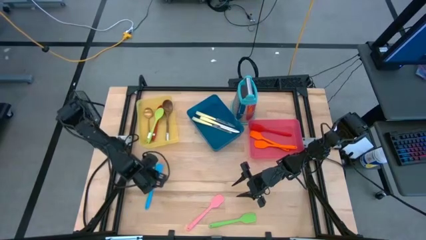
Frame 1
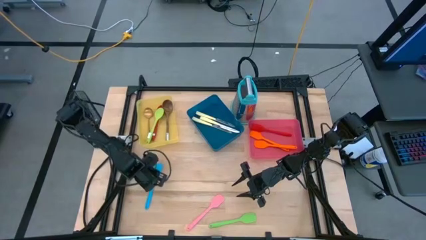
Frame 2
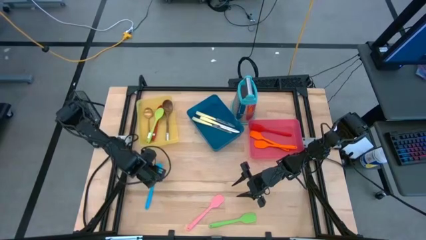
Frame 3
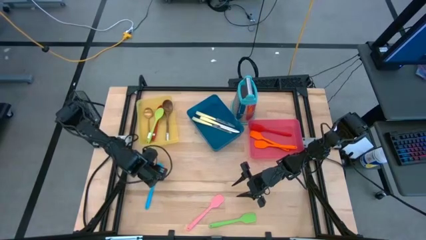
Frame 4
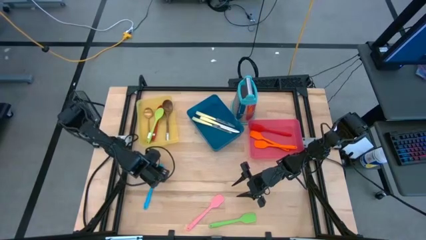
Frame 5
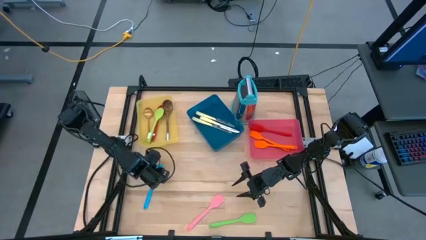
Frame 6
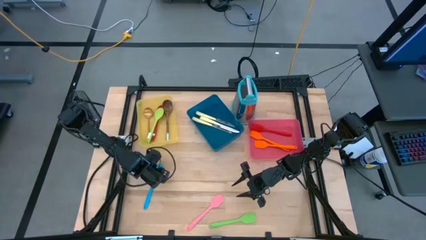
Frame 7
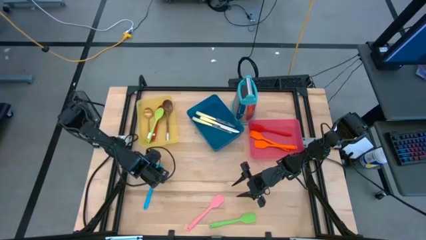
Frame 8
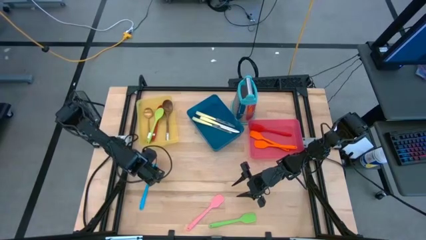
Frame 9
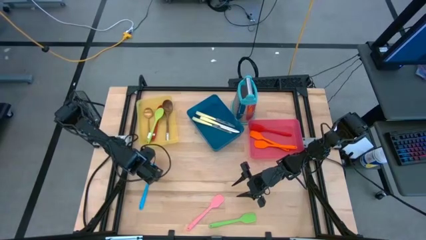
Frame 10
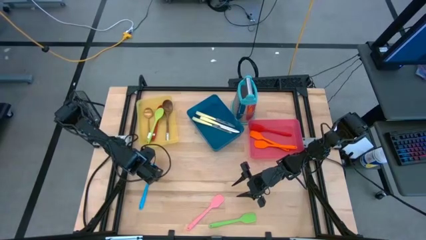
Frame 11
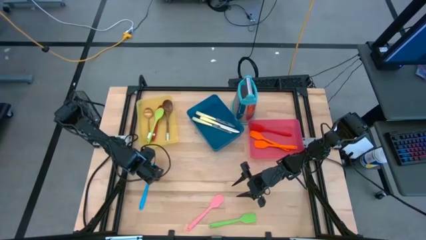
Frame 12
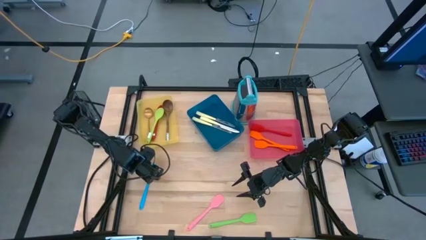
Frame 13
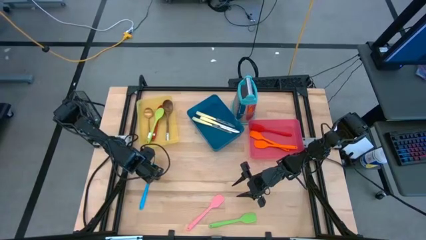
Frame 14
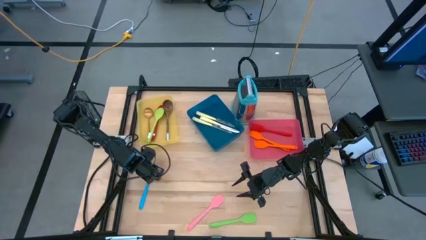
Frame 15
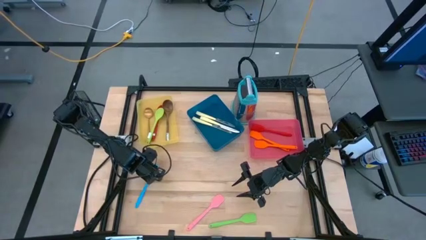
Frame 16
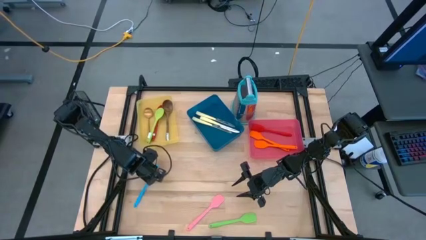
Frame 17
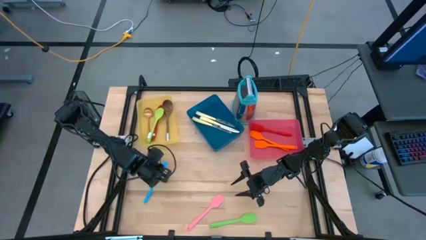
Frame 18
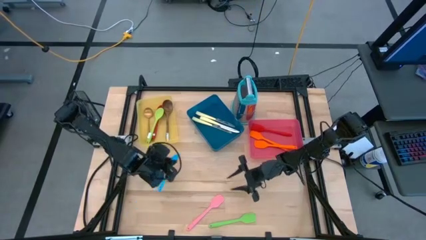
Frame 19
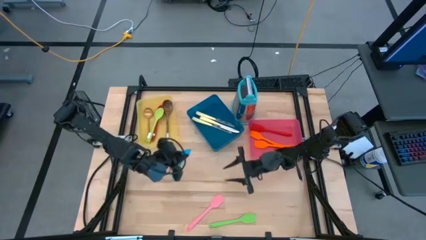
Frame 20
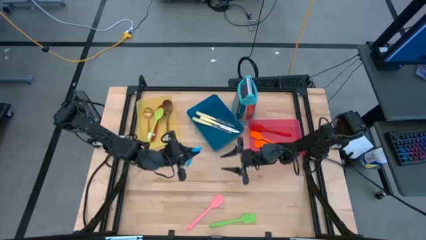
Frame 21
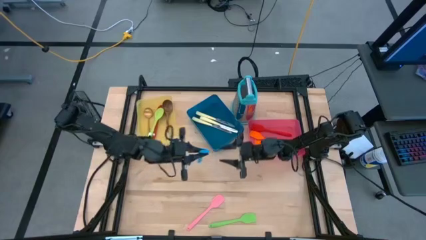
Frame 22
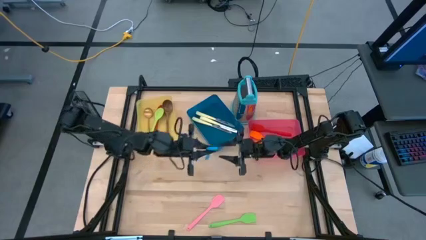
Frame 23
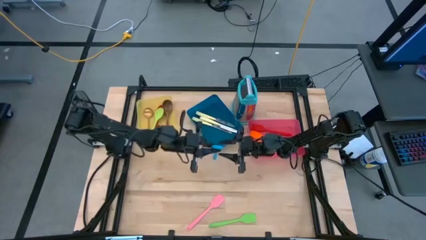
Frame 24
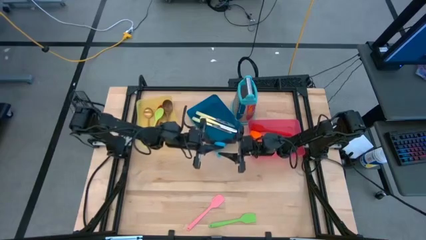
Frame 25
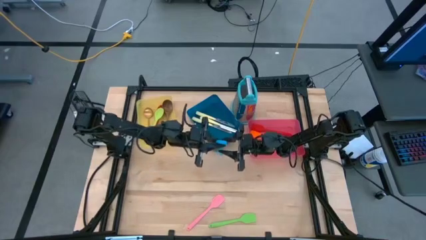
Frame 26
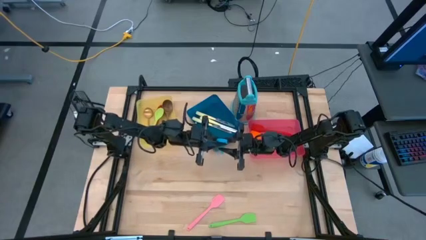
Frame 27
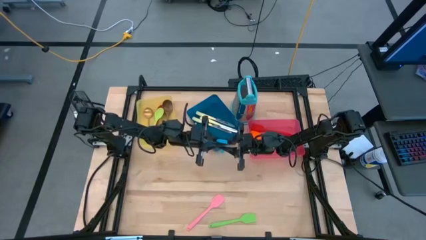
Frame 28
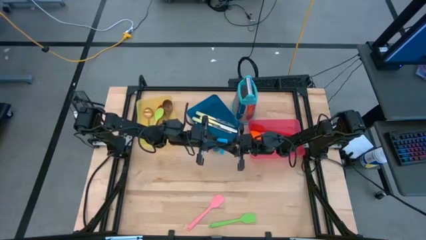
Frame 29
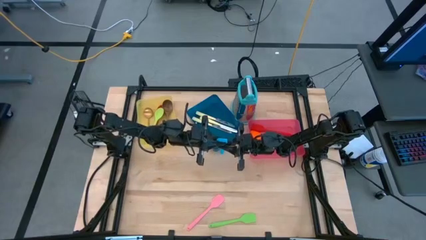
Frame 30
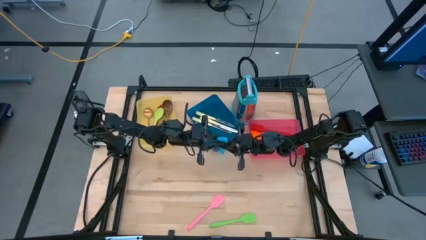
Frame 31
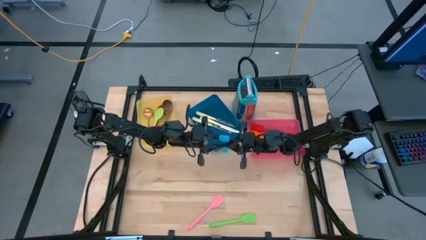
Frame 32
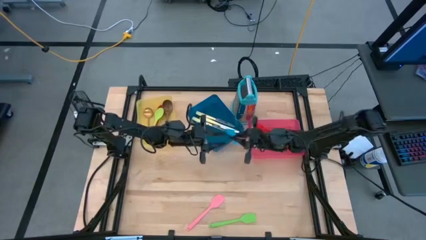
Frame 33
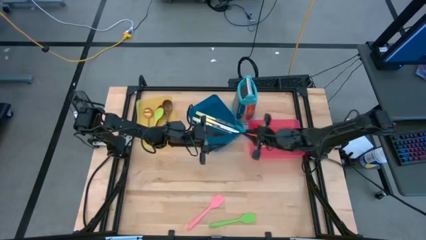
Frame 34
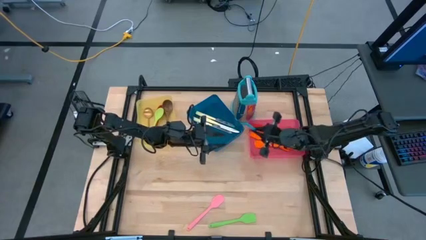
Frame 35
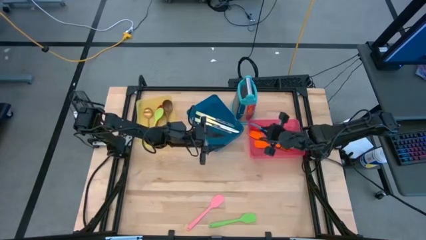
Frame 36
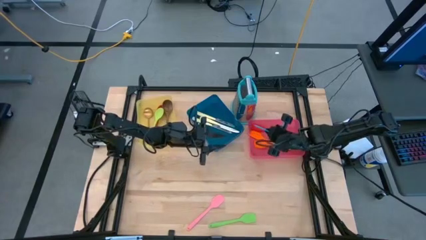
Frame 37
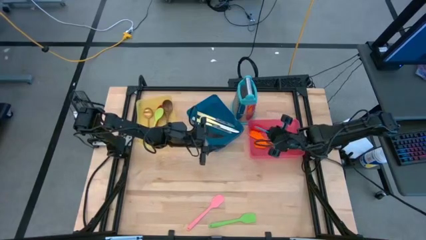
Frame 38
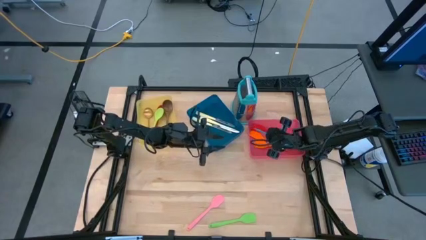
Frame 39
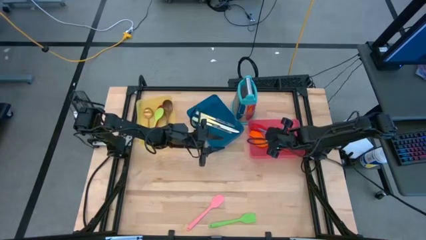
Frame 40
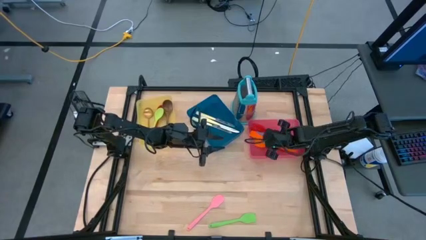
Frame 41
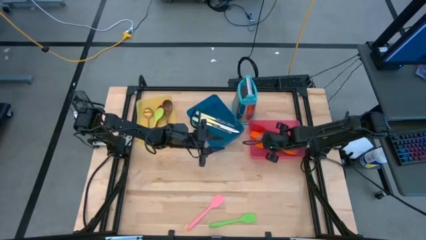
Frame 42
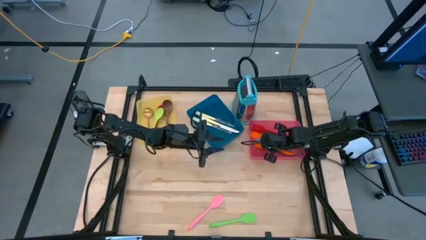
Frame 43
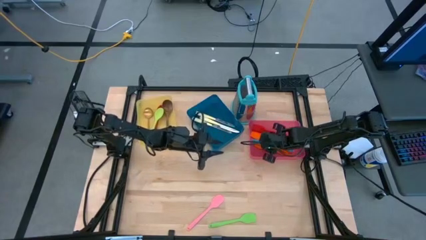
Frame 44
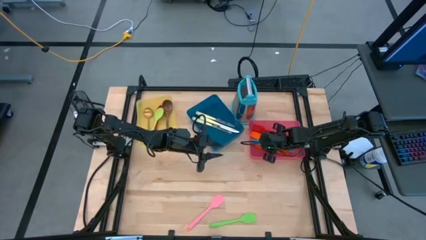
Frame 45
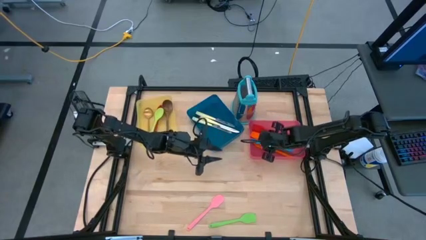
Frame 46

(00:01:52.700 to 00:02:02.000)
Task: Pick & Place Kitchen Items
Put the blue spatula into the pink bin

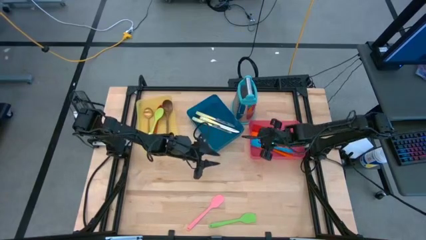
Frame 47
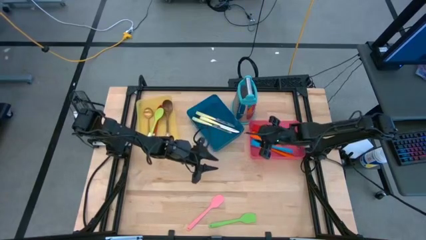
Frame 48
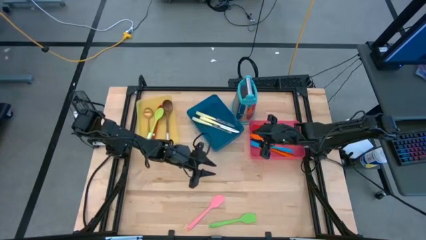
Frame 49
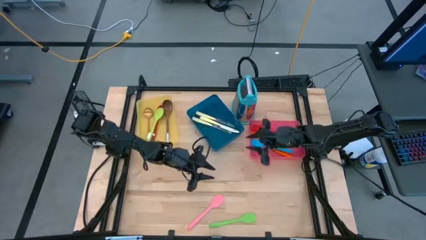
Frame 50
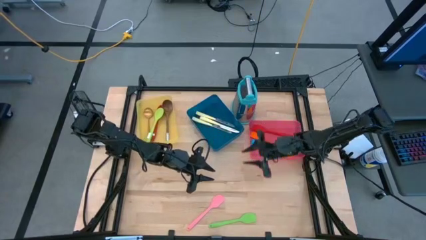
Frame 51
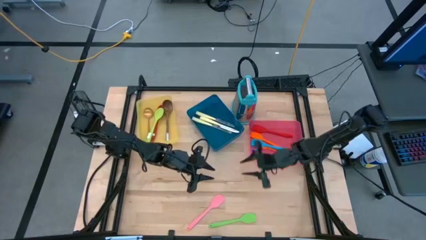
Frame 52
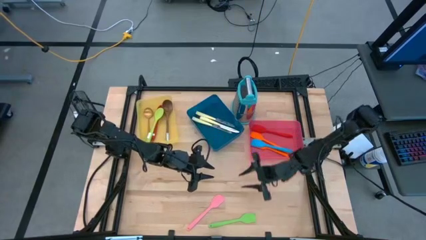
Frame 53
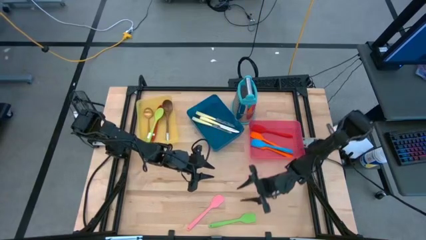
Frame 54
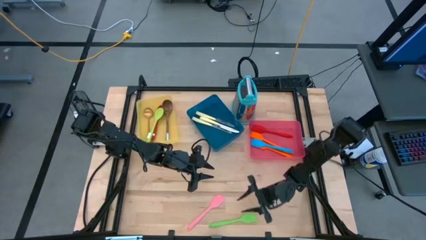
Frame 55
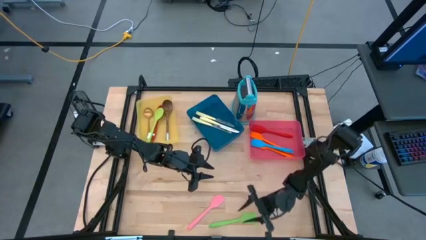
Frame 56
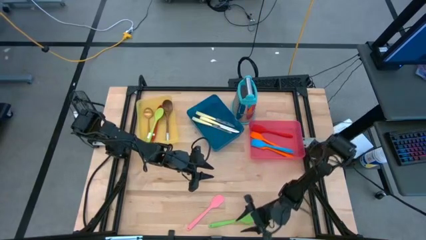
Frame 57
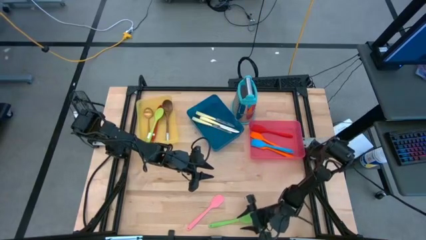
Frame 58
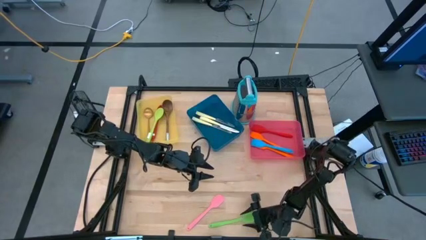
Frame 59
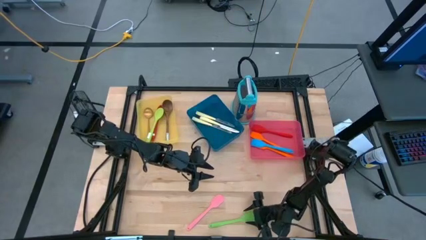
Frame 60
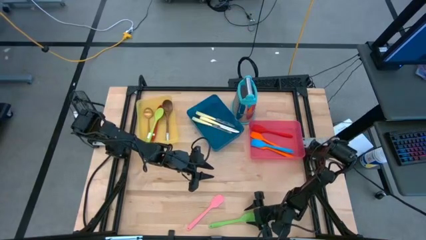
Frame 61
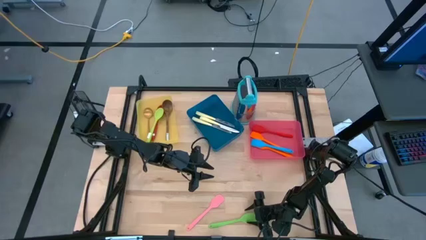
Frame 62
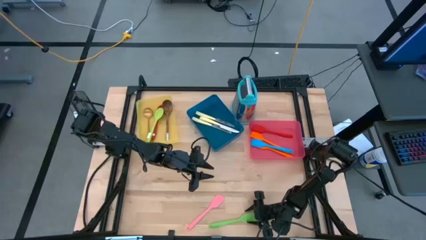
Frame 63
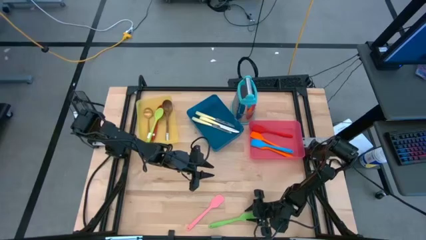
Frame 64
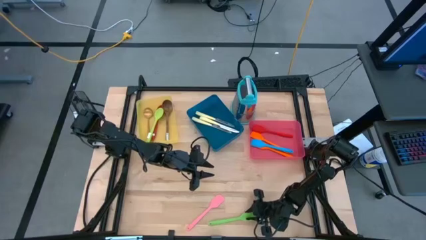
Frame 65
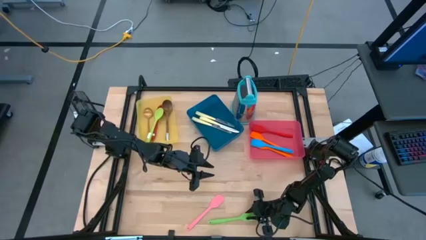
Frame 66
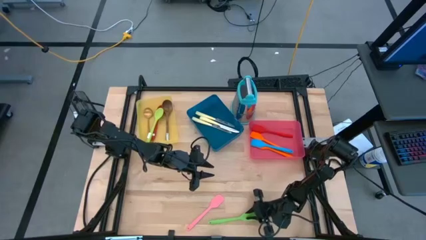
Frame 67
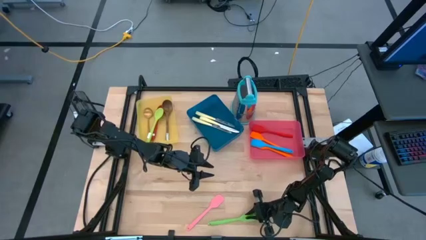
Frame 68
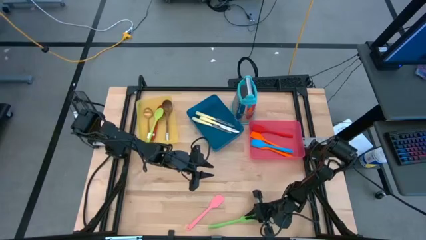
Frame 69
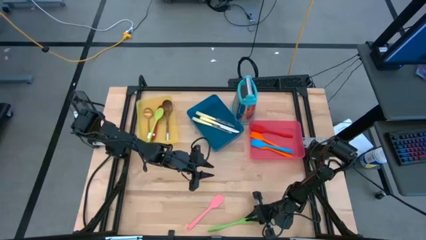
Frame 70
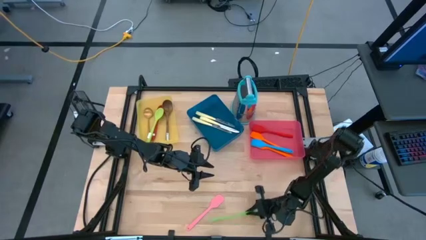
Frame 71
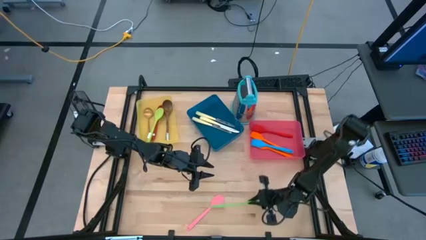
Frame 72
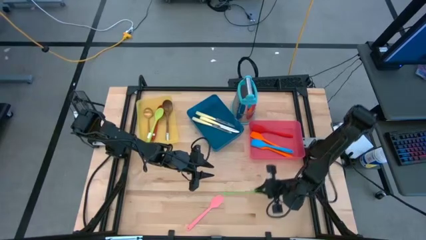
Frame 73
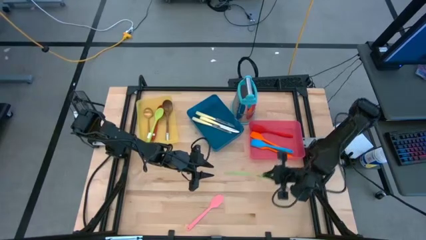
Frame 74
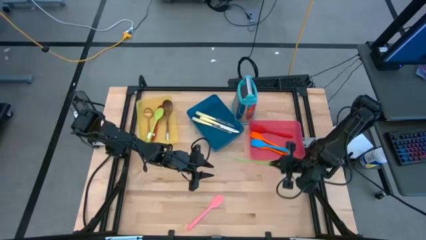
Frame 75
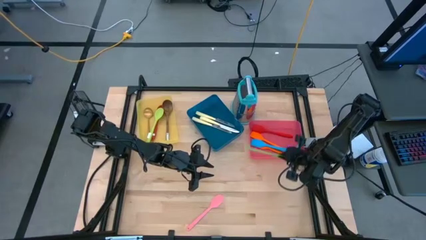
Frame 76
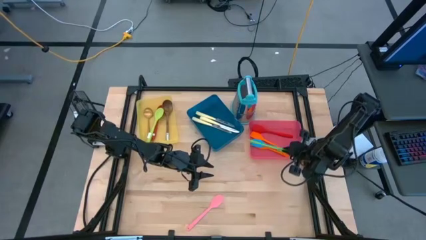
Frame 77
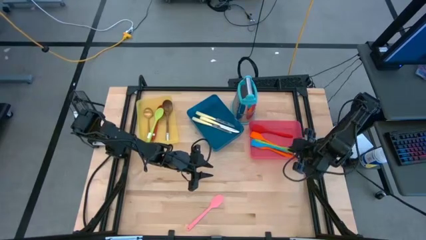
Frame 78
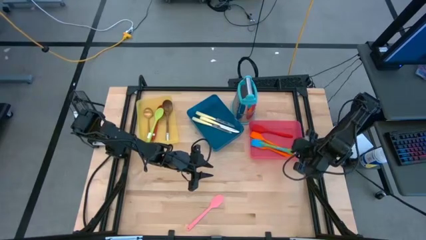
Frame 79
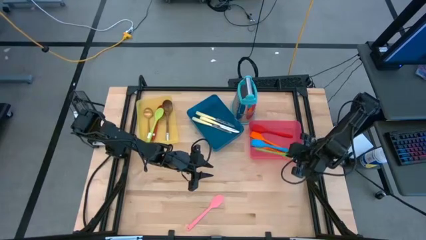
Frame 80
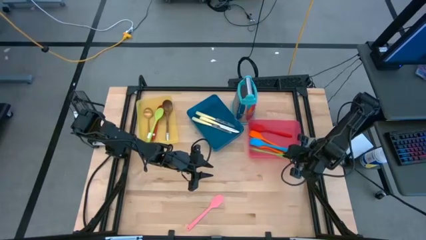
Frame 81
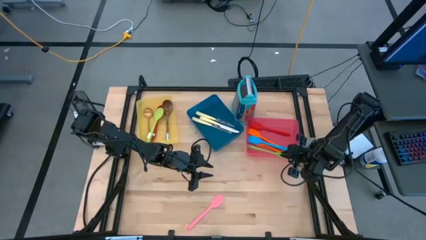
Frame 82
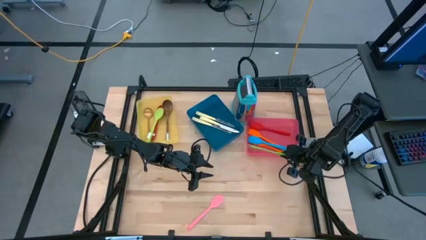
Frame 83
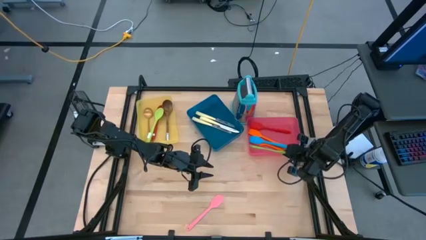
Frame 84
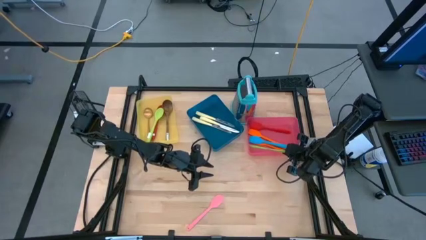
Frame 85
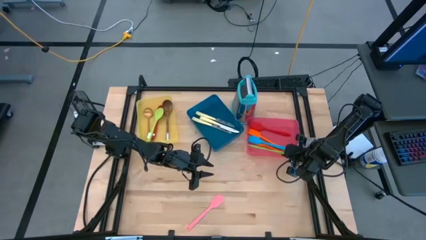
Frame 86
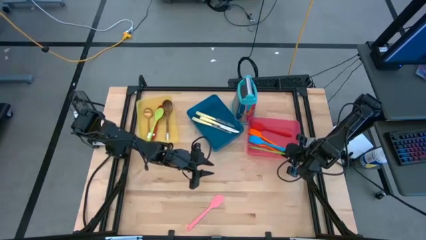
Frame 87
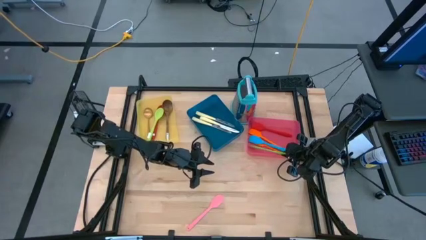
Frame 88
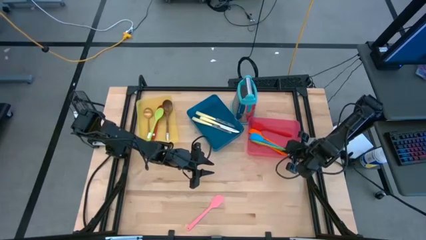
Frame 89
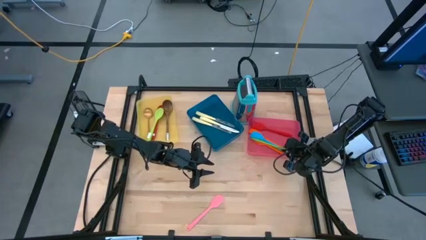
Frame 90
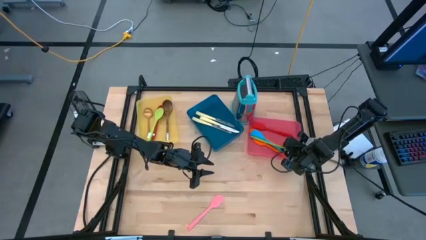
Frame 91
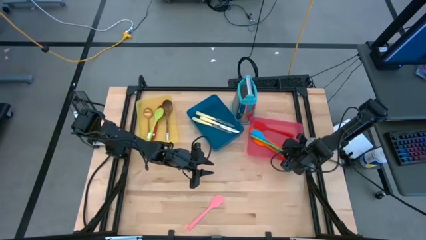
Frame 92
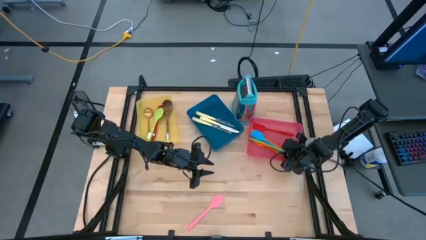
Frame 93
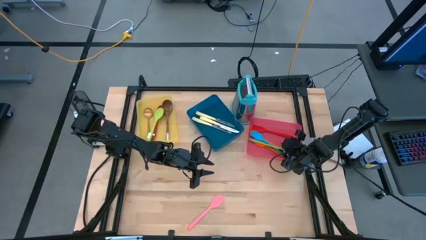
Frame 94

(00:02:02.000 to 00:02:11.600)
Put the green spatula into the pink bin
